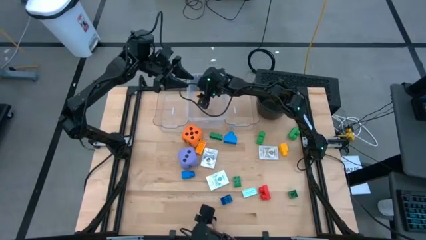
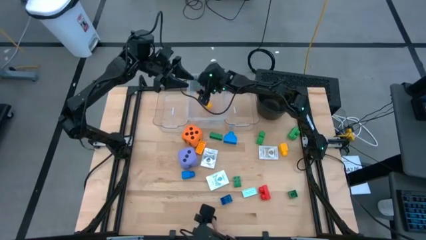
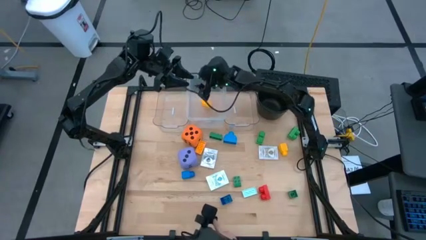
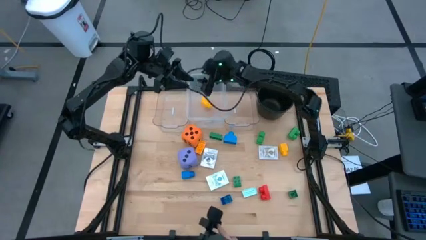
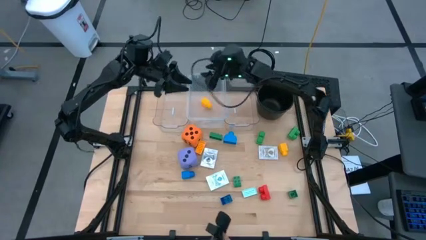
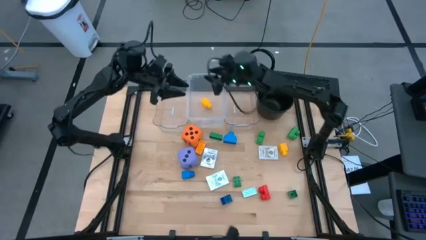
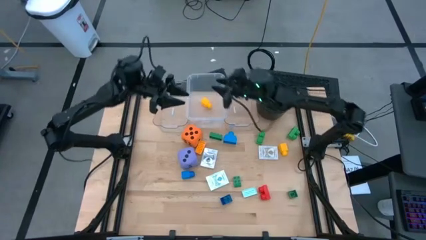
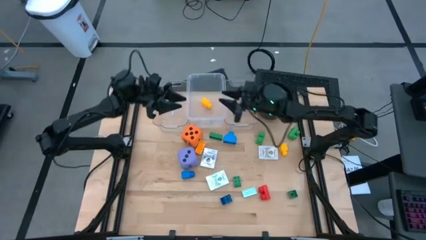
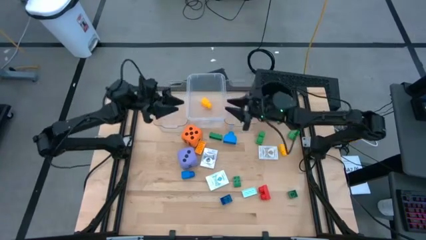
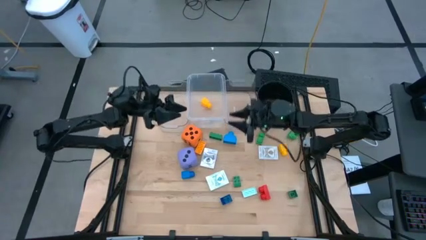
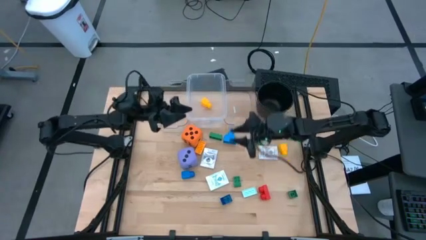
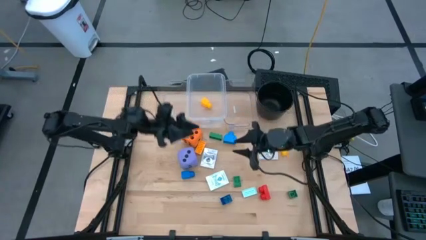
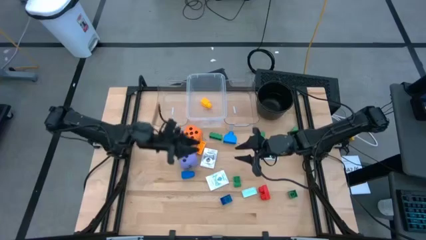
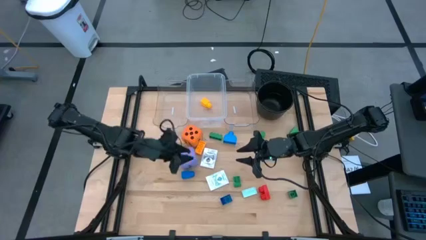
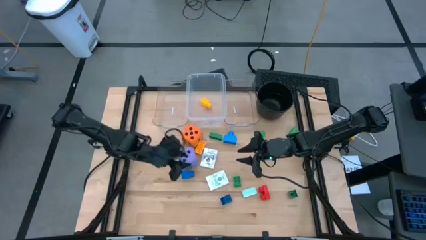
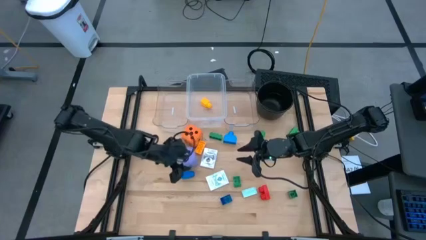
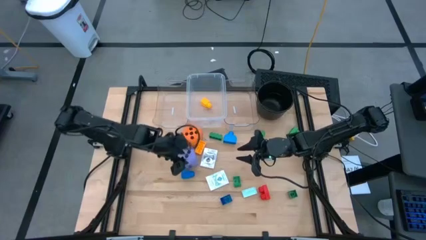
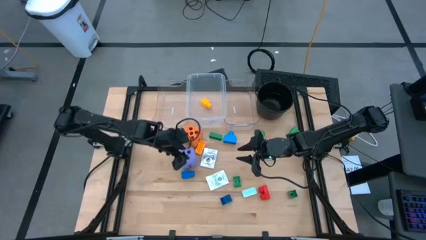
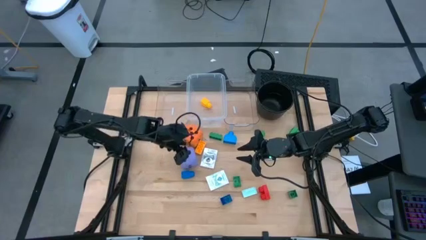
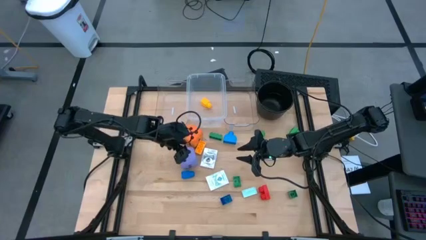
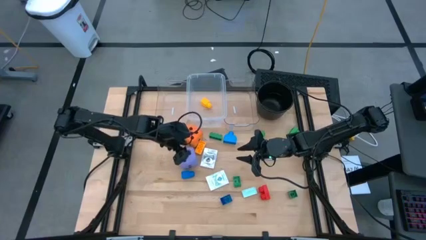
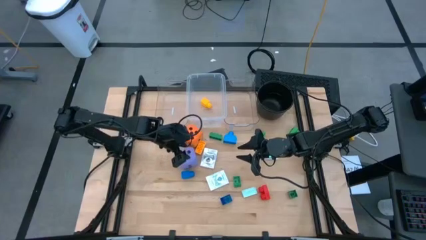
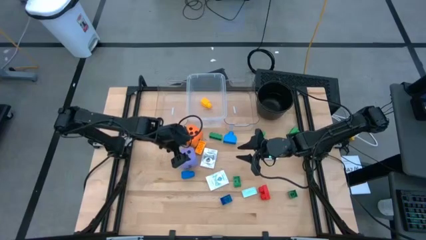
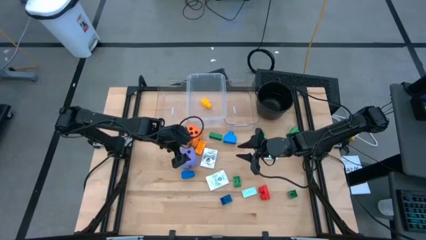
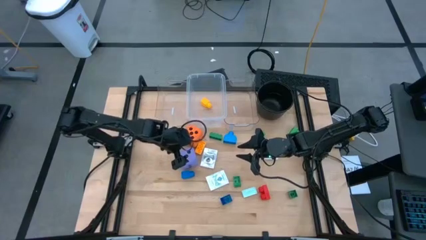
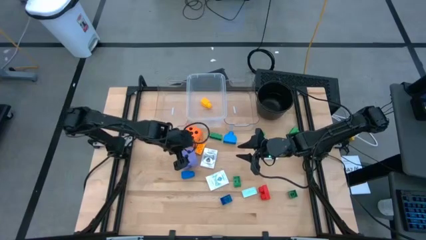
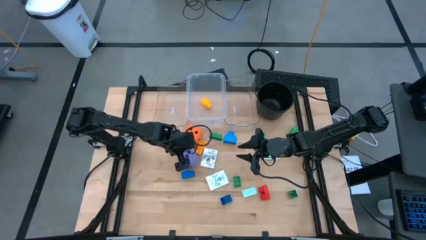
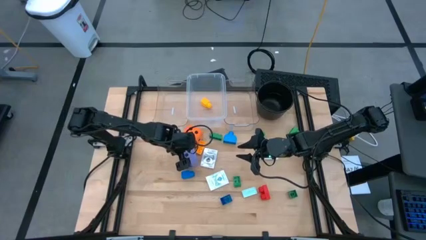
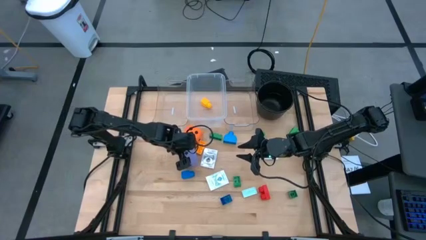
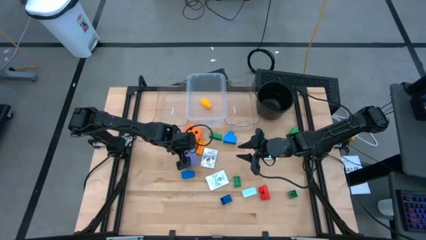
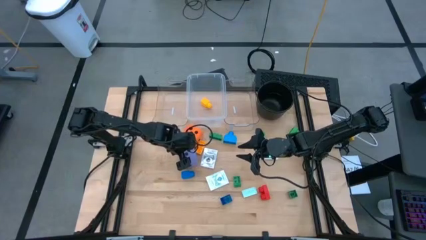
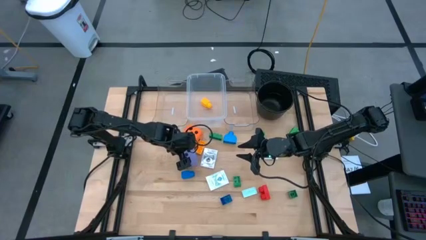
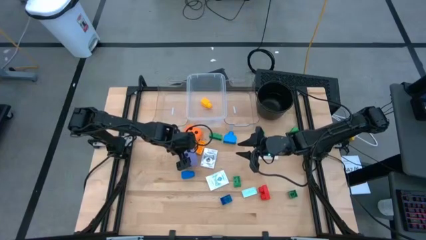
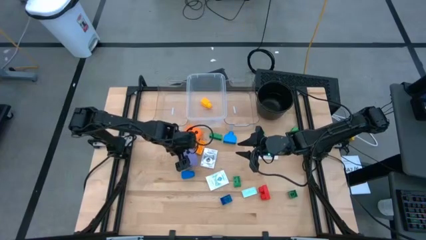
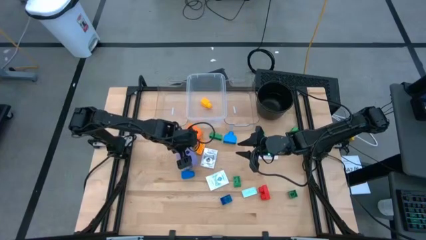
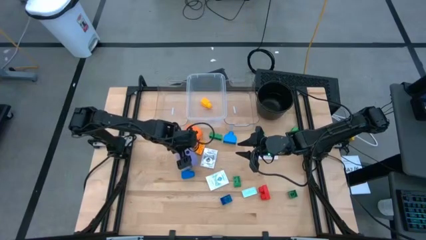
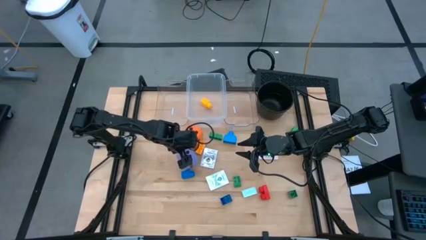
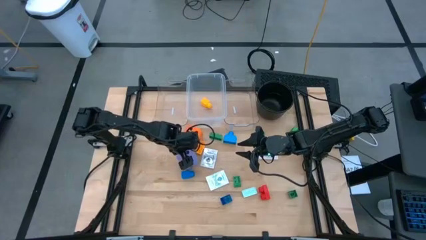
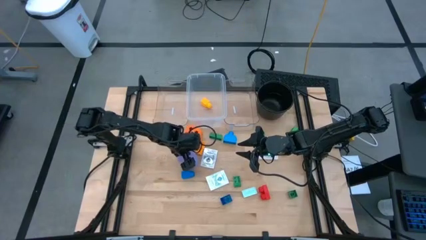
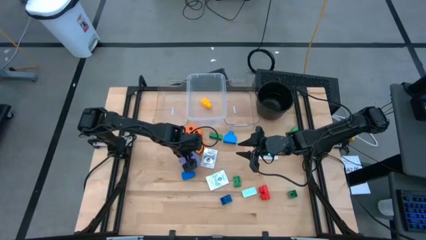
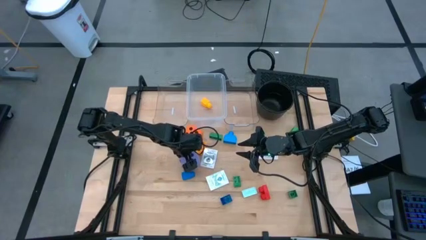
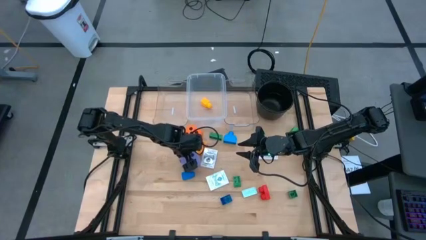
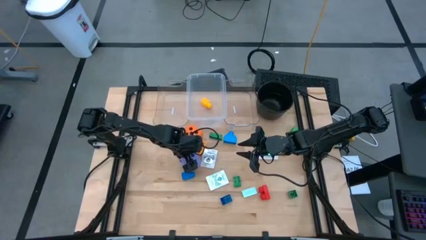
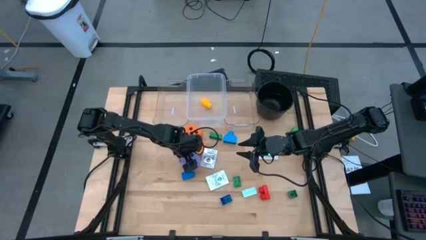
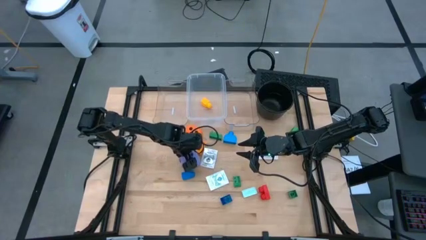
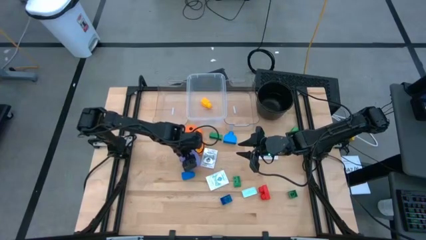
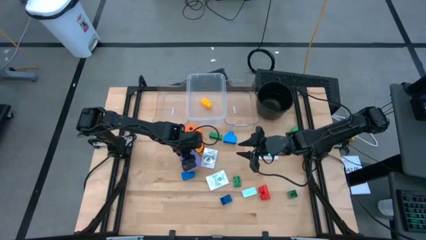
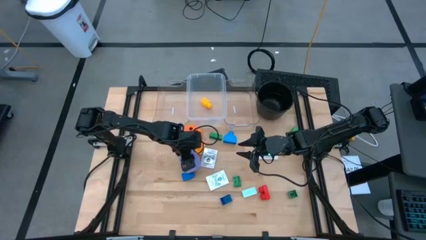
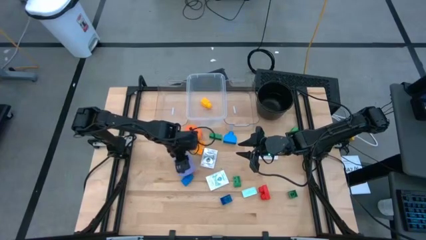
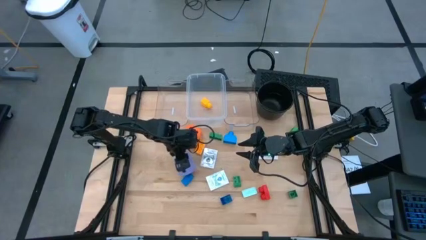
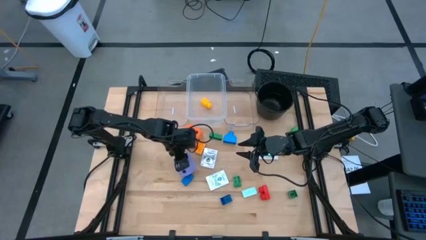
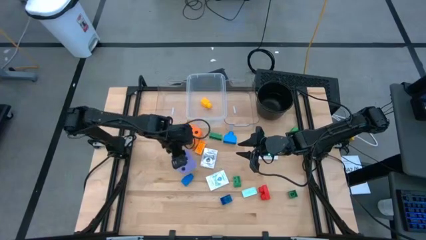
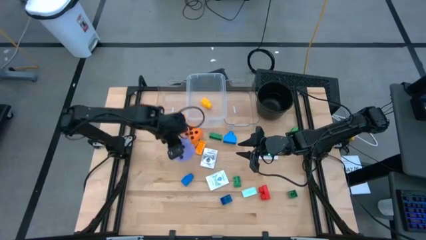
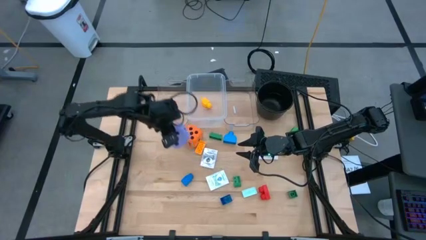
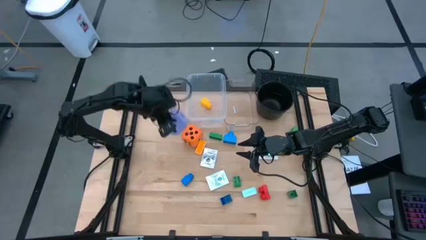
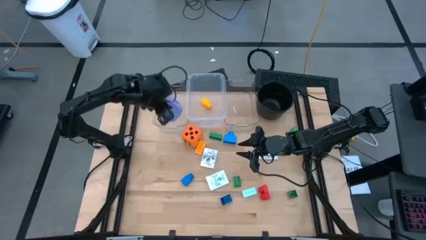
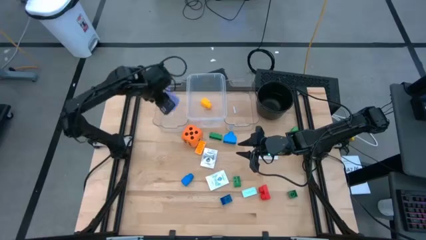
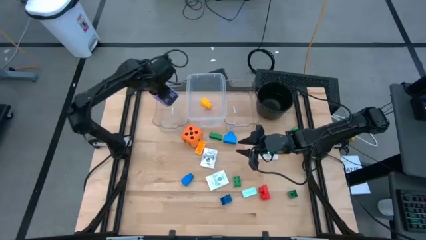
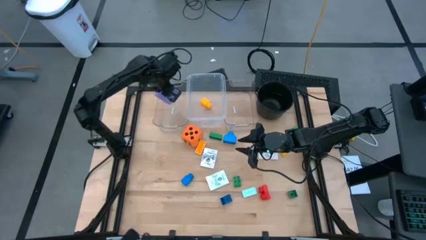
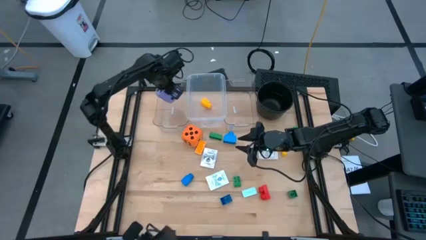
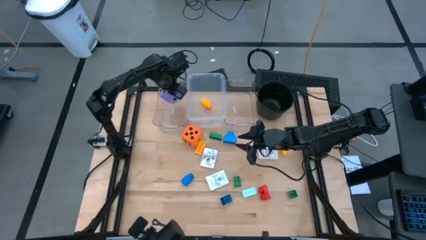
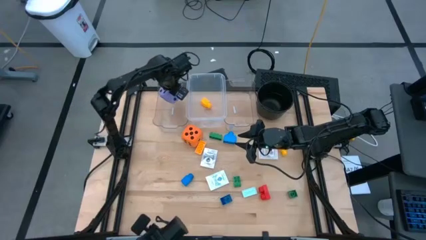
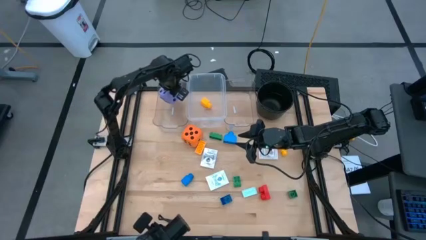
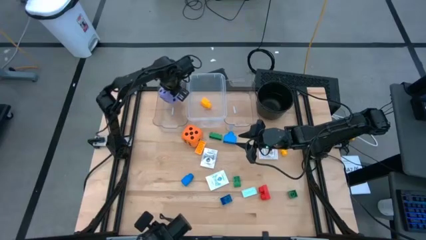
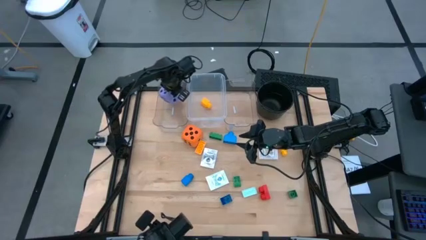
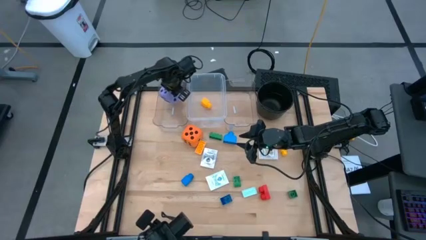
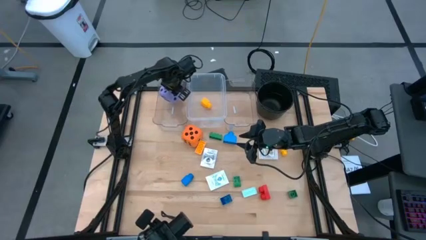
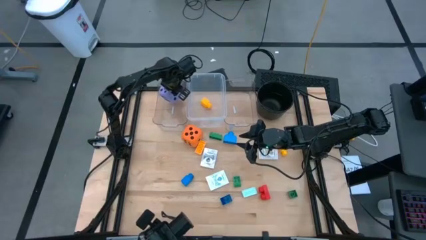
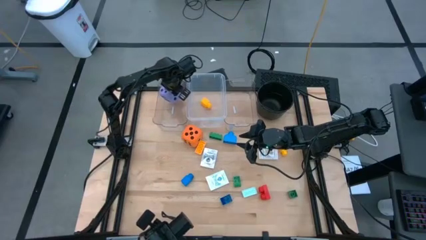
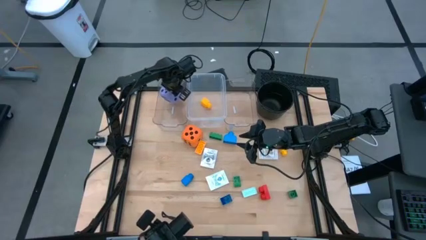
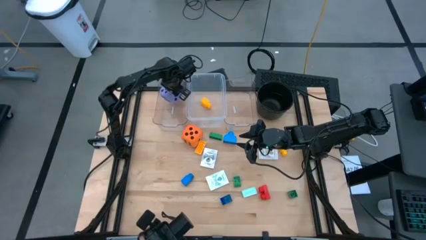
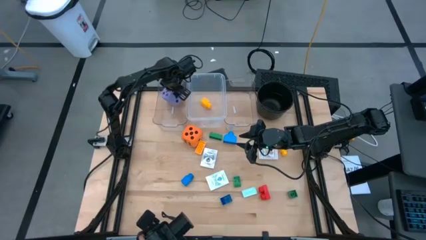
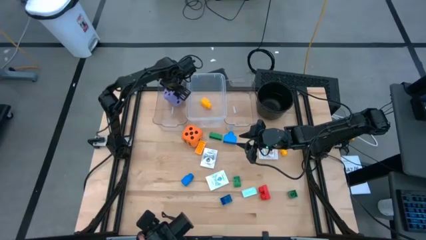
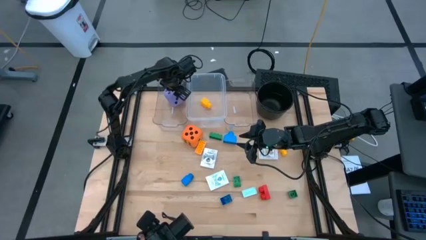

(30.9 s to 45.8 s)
Task: Pick & Place Toys
Put the purple dice into the left transparent bin
